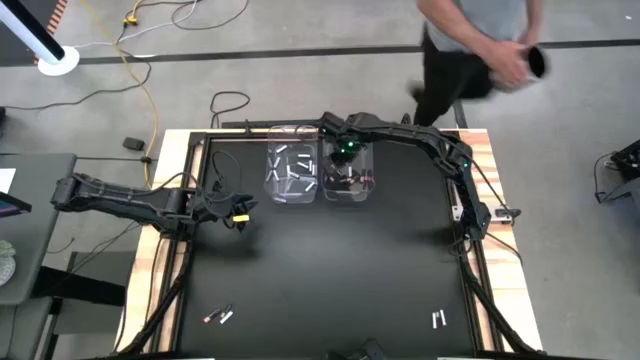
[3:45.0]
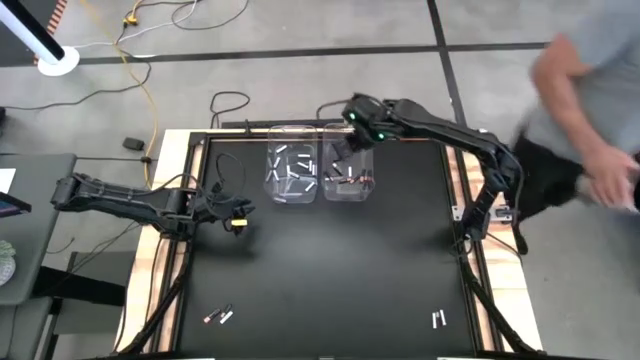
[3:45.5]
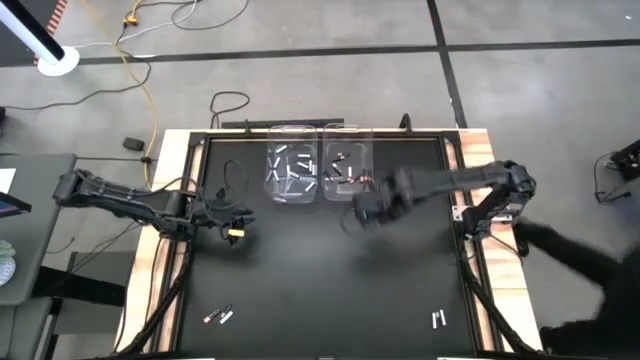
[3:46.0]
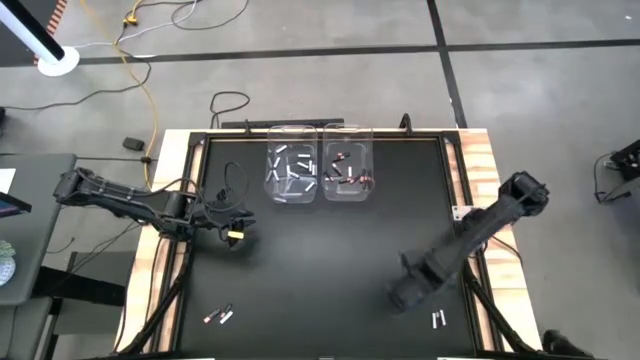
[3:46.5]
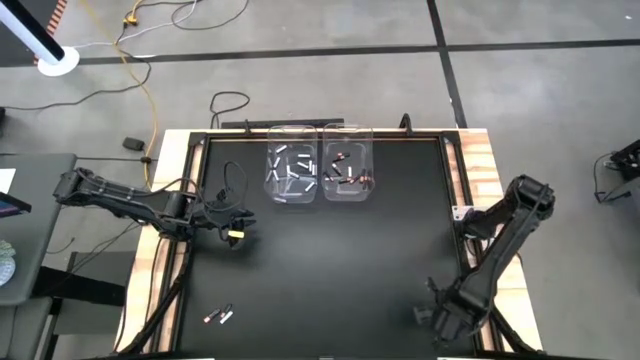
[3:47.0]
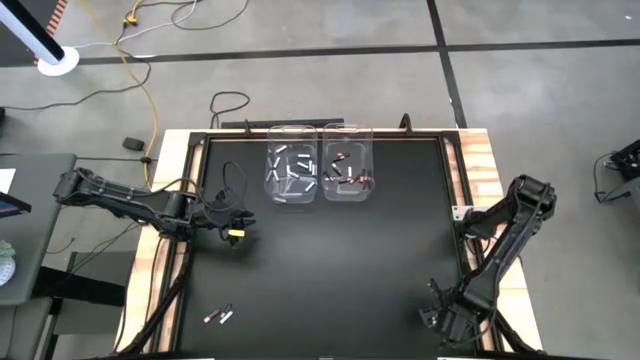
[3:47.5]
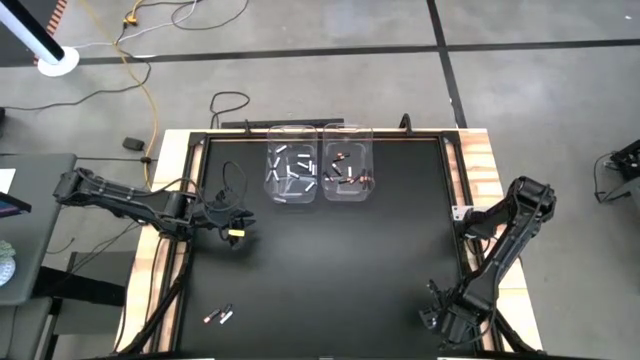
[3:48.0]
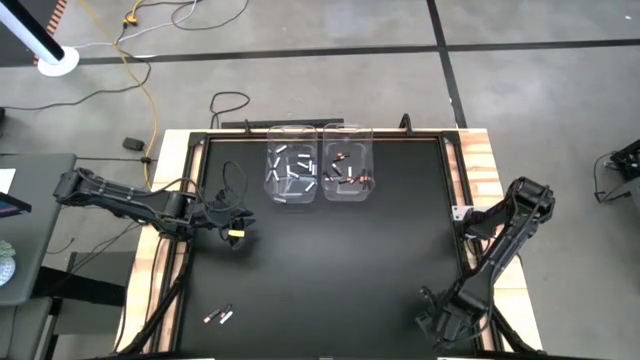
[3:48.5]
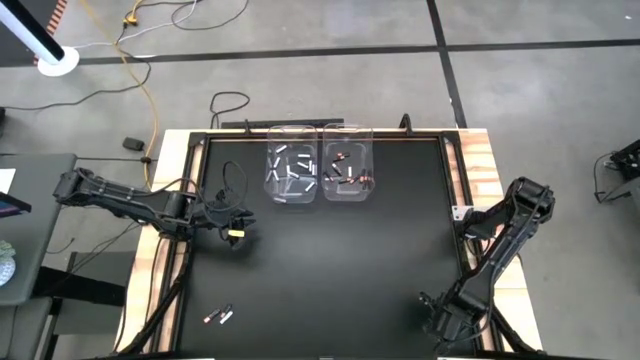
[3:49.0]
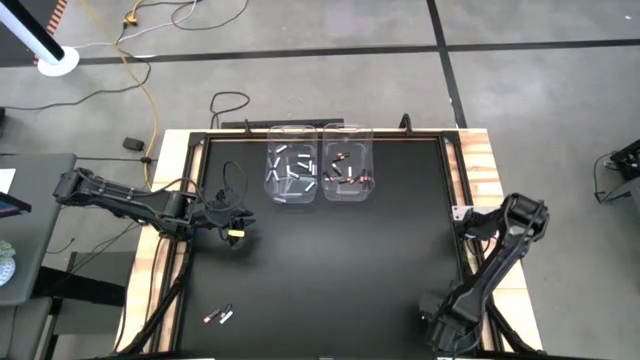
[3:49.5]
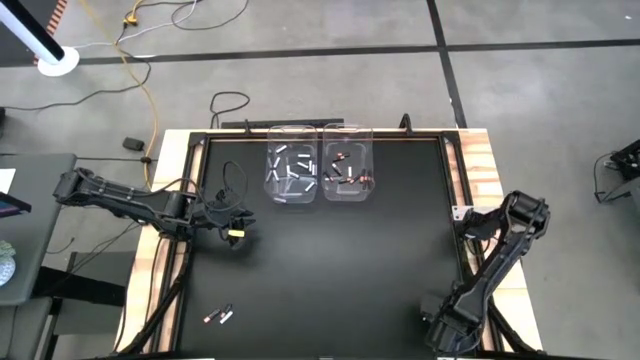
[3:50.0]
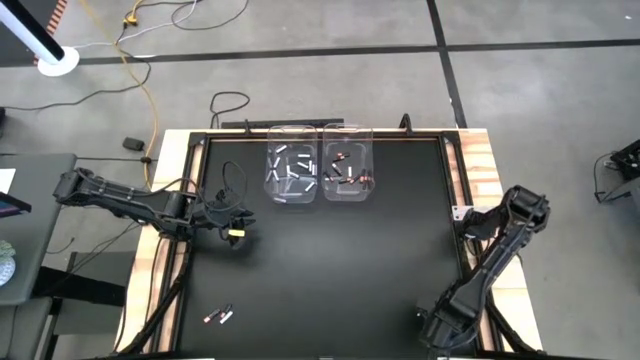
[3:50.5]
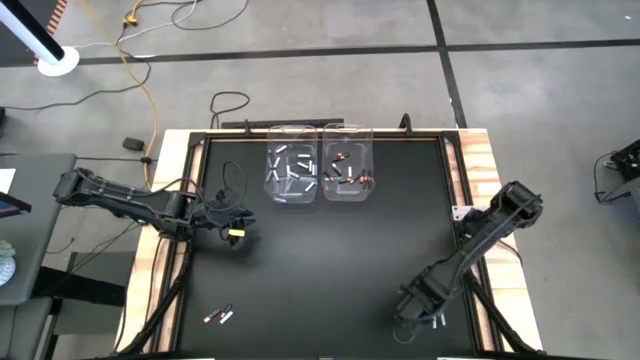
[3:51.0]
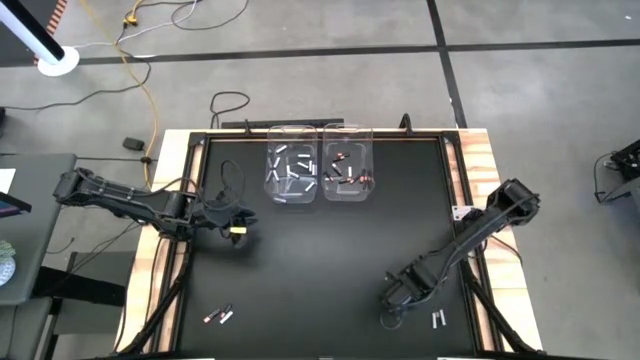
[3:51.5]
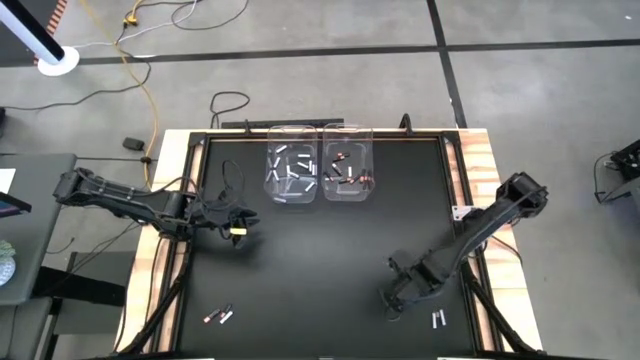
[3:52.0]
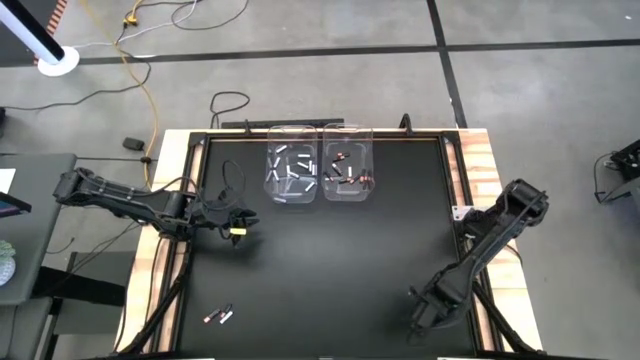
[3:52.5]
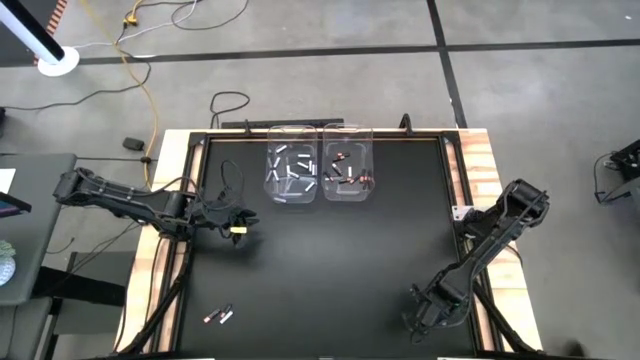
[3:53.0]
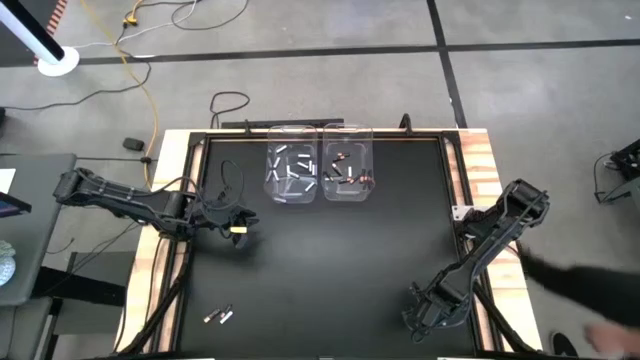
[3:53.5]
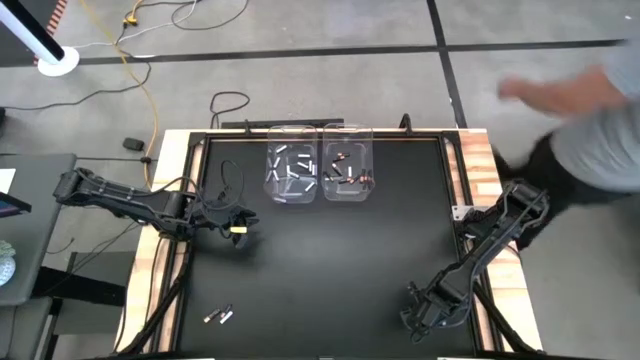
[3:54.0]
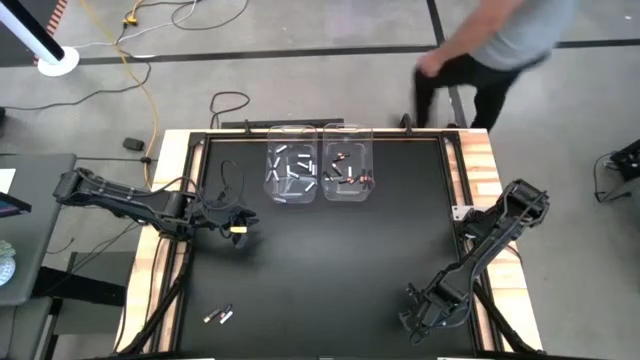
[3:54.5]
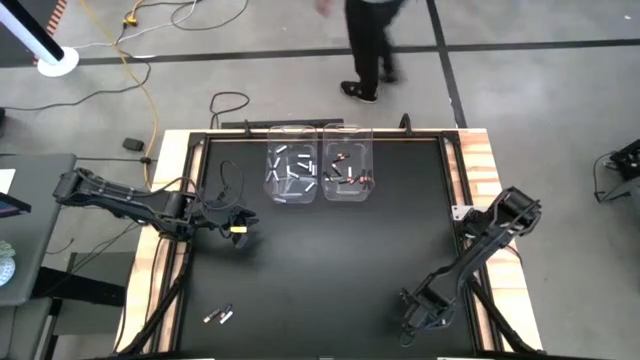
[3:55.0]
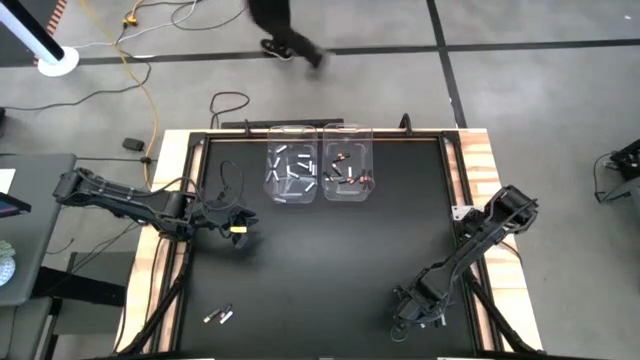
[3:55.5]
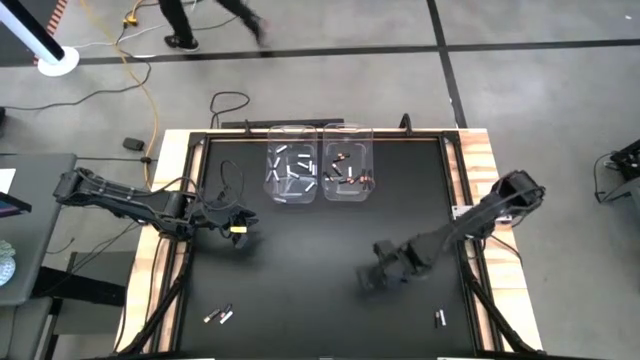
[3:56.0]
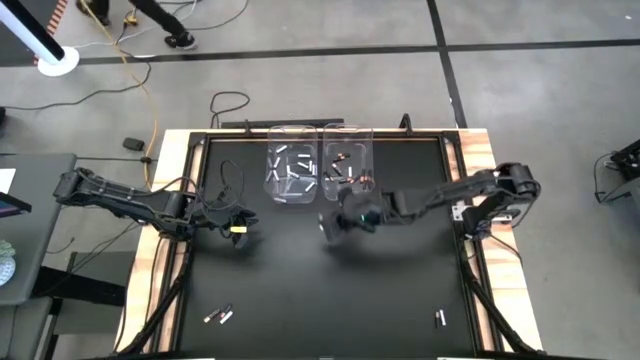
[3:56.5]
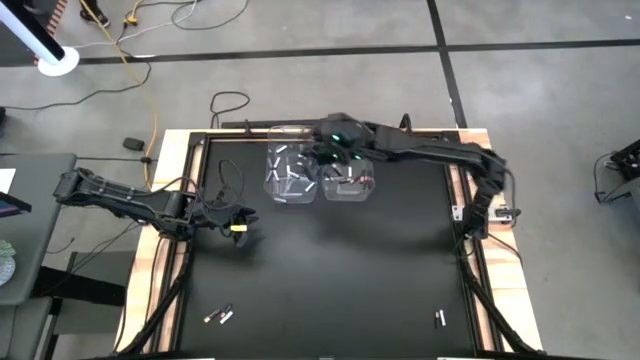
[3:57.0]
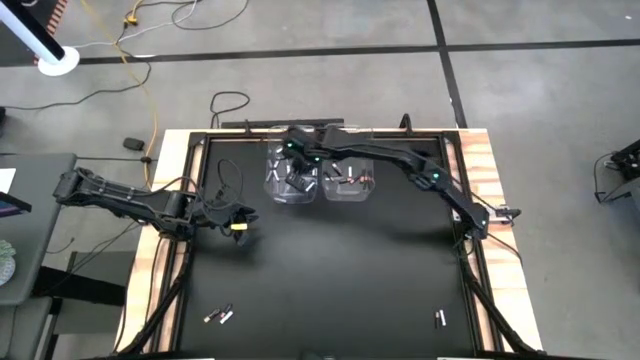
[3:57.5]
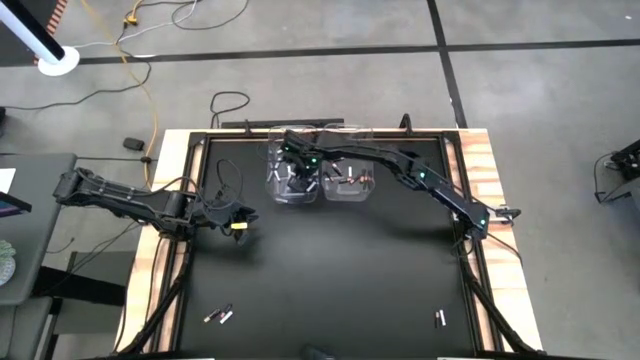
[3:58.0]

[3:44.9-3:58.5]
Task: Sort batteries
Put the white battery into the left transparent bin

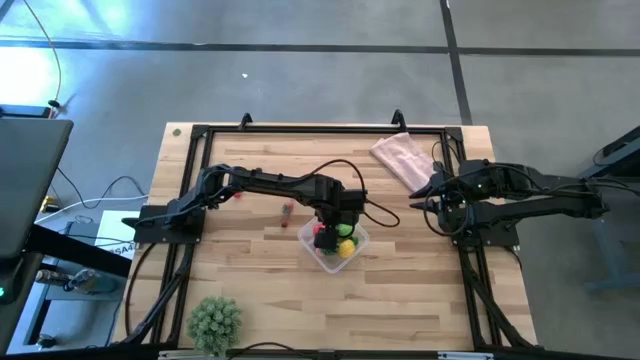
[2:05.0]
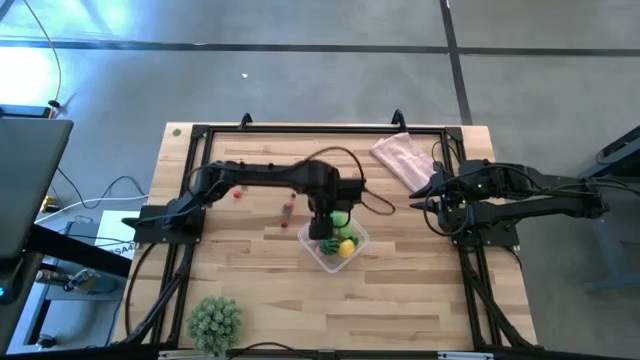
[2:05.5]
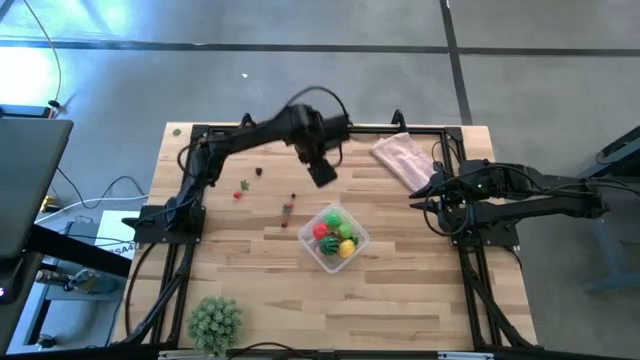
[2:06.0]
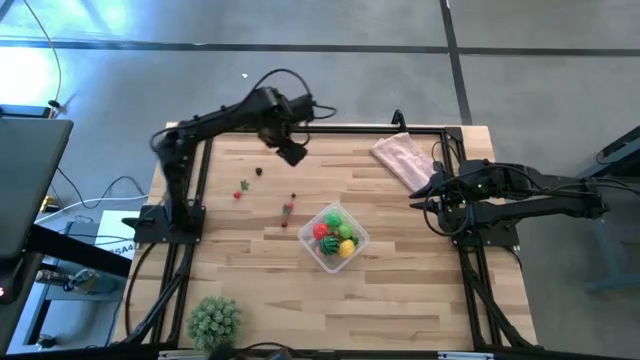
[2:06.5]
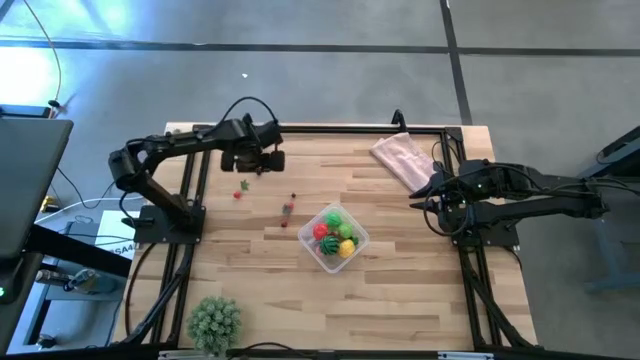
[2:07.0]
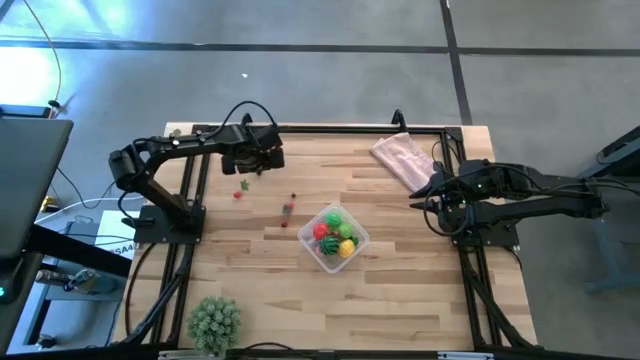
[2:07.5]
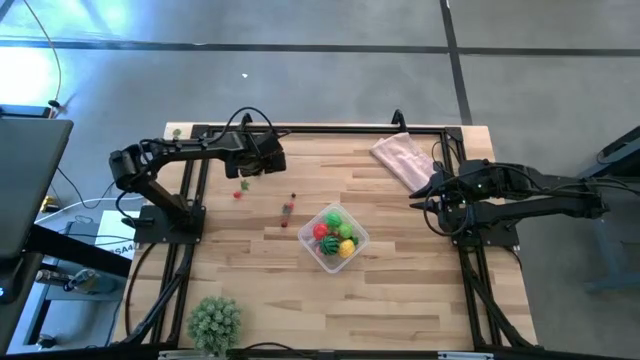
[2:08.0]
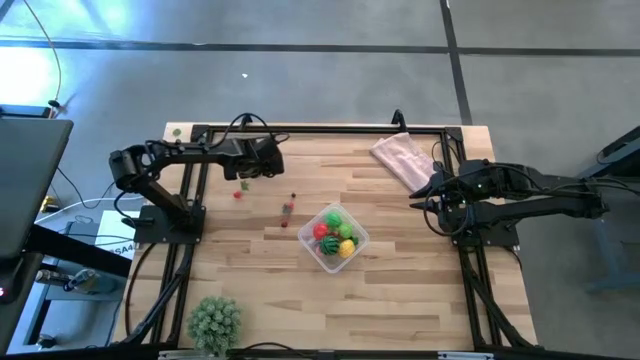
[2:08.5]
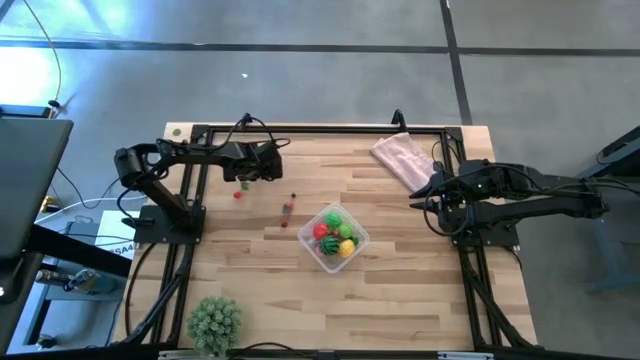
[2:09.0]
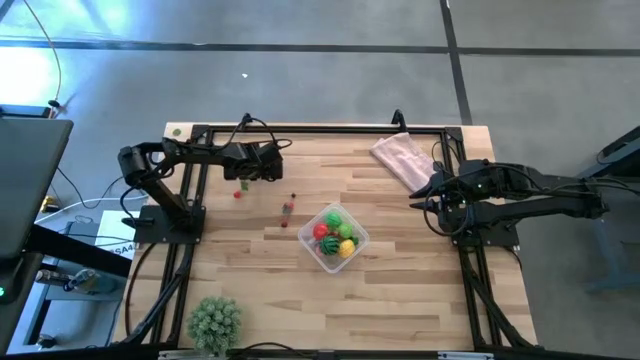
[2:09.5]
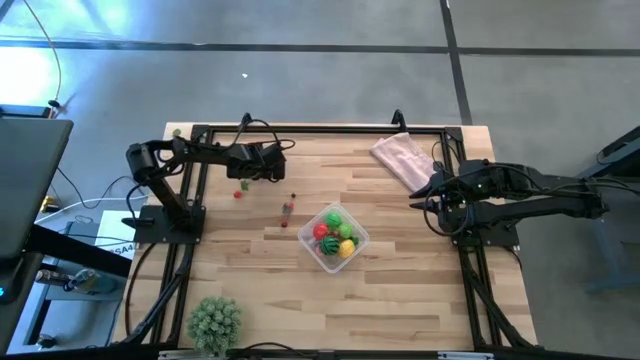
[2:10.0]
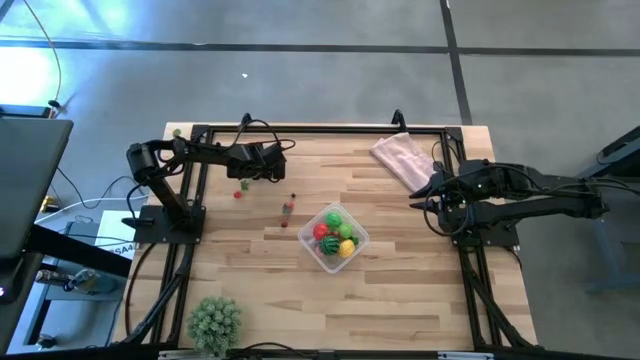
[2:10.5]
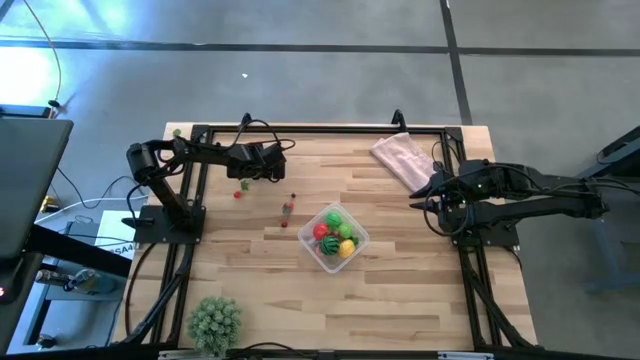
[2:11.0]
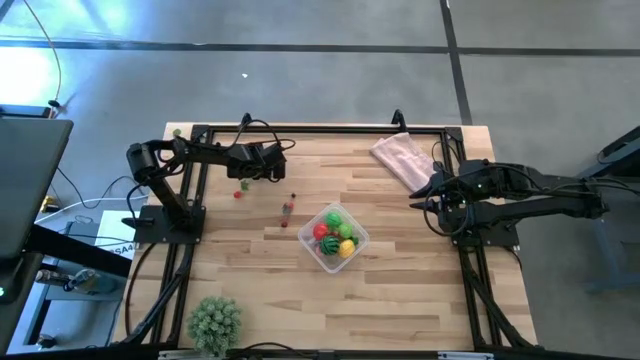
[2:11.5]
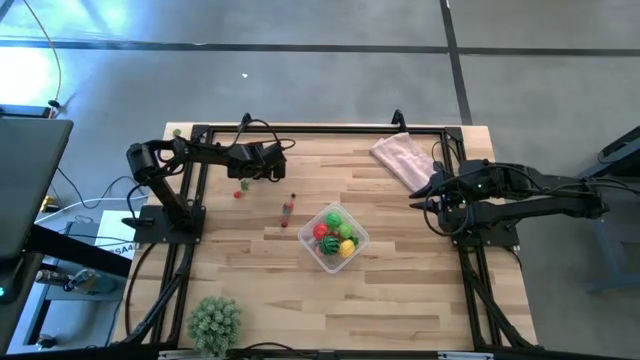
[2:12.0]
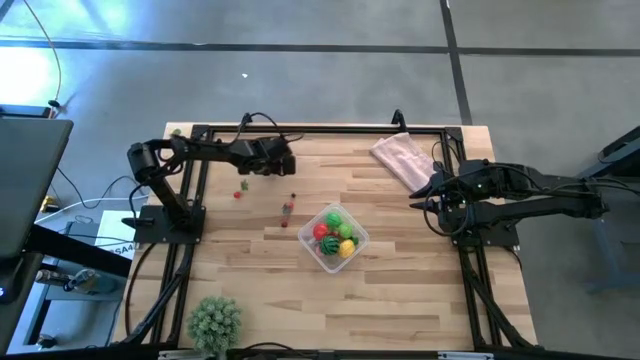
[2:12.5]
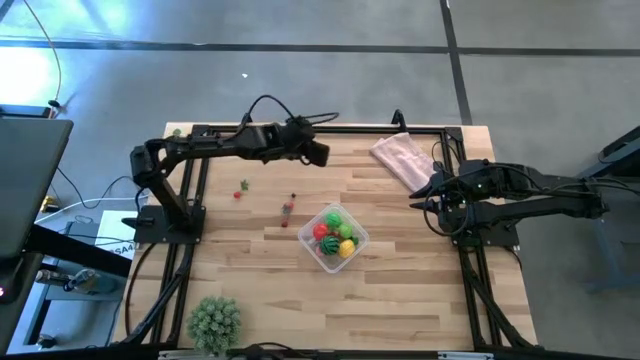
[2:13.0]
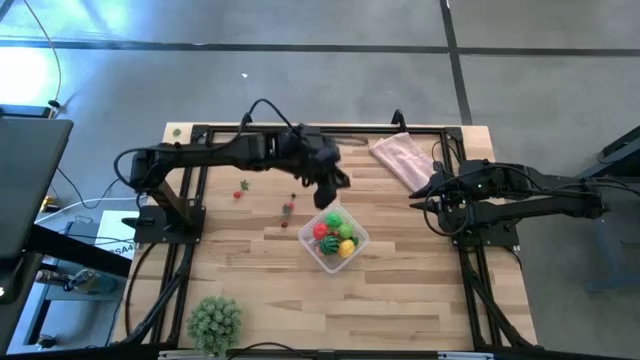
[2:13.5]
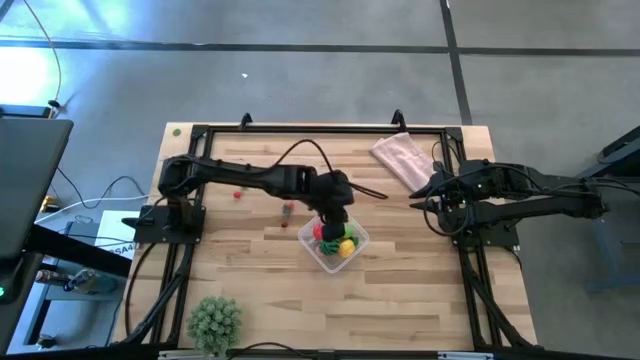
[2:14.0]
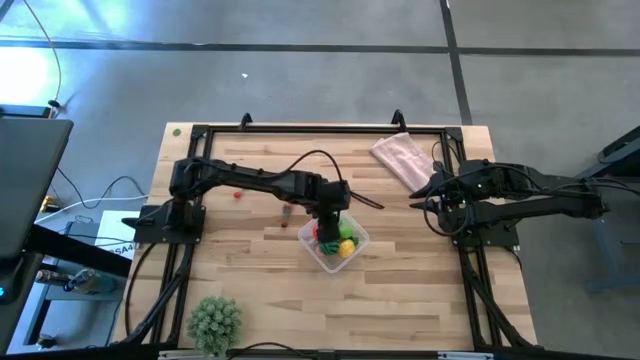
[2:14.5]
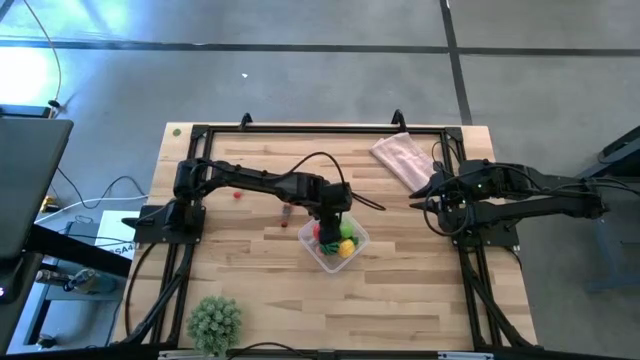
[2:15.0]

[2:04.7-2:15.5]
Task: Pick and placing Produce into tupperware
Put the blackberry into the transparent container
